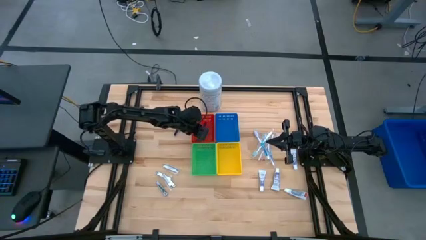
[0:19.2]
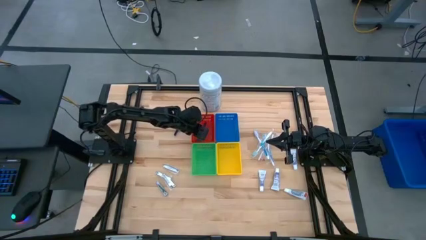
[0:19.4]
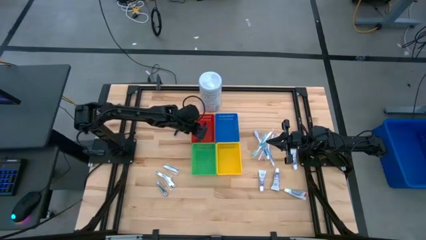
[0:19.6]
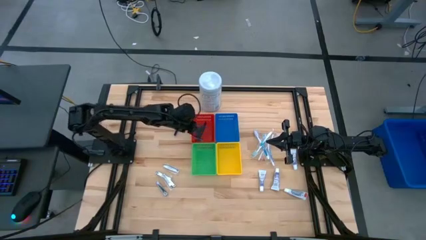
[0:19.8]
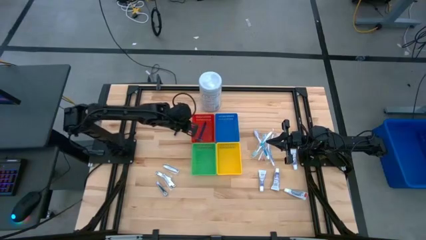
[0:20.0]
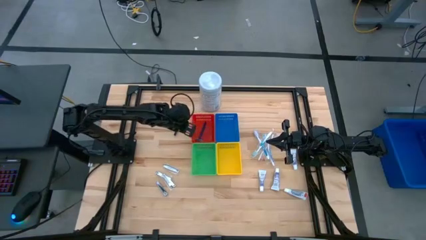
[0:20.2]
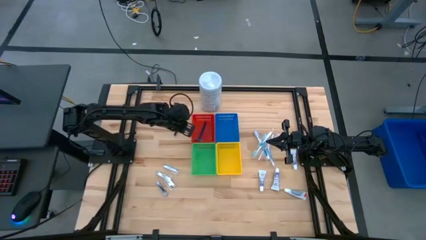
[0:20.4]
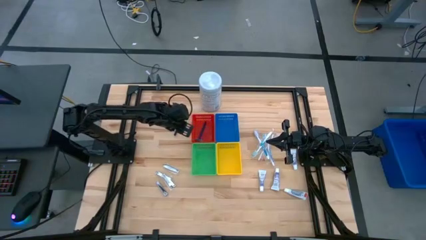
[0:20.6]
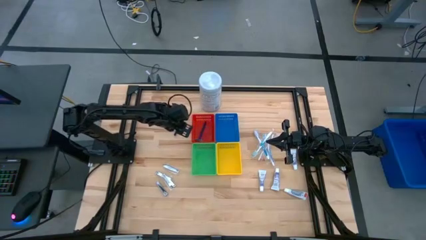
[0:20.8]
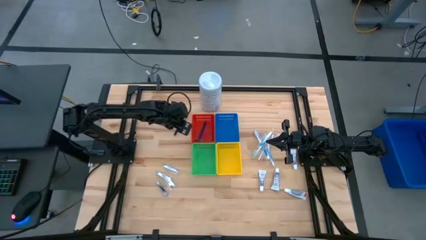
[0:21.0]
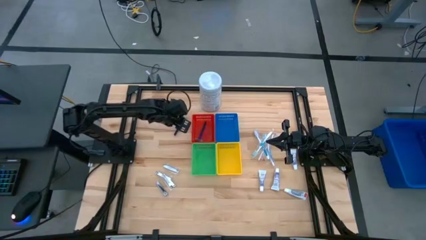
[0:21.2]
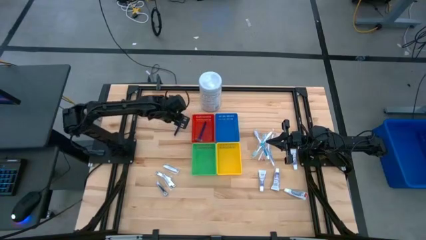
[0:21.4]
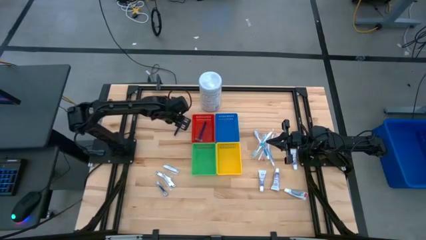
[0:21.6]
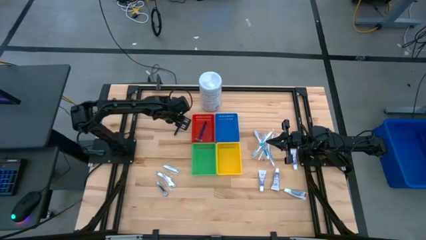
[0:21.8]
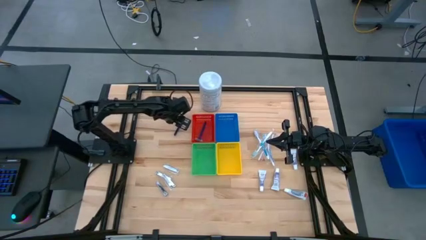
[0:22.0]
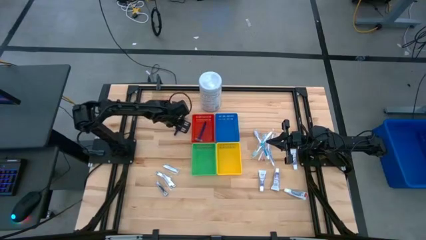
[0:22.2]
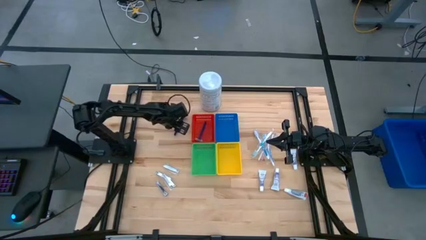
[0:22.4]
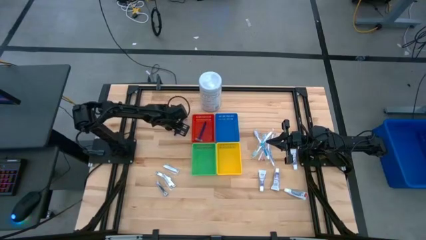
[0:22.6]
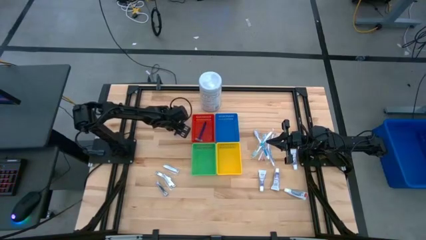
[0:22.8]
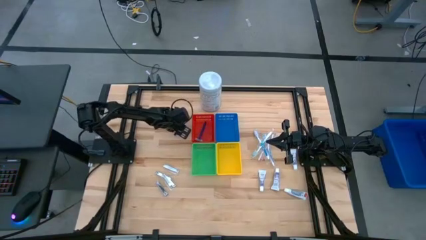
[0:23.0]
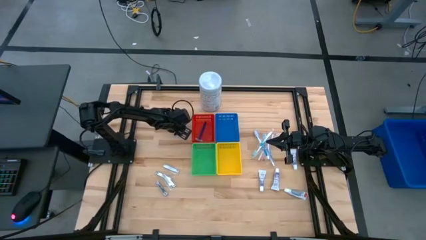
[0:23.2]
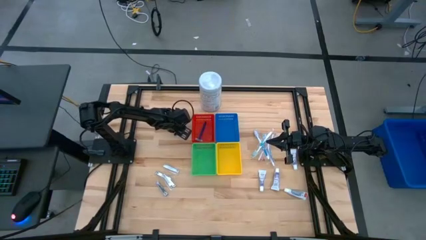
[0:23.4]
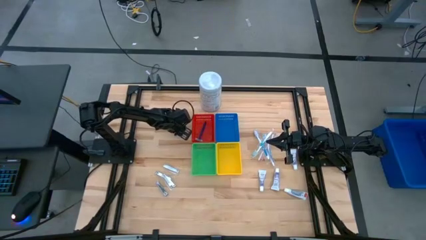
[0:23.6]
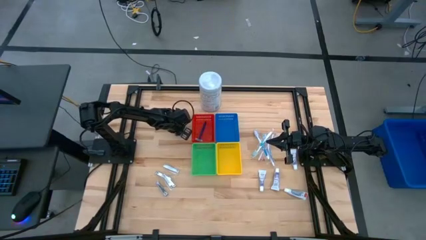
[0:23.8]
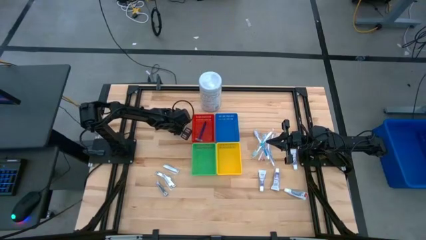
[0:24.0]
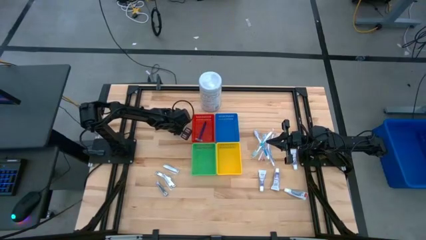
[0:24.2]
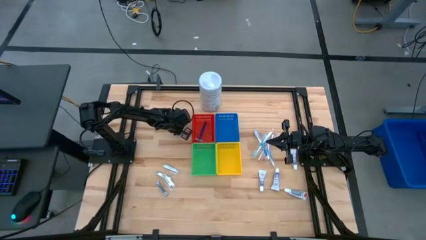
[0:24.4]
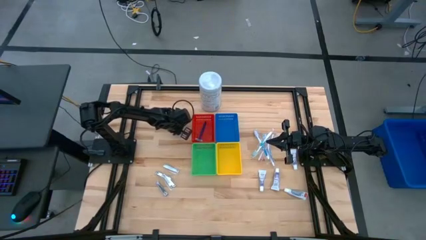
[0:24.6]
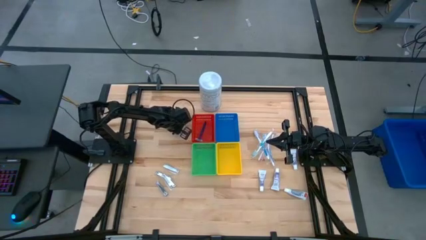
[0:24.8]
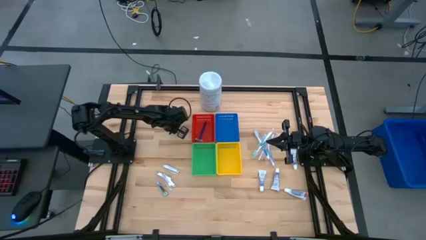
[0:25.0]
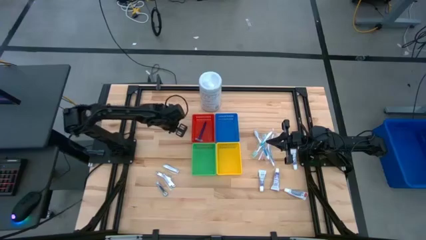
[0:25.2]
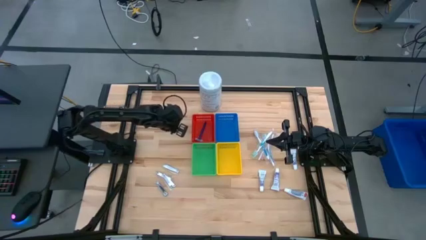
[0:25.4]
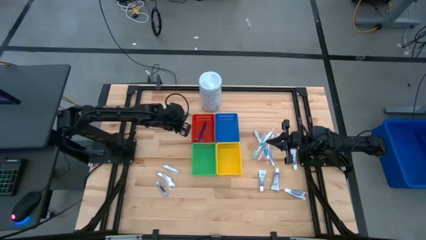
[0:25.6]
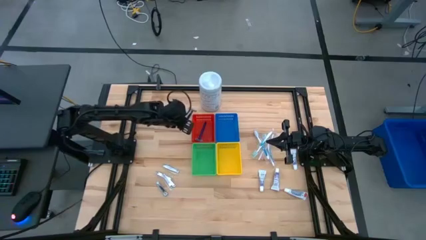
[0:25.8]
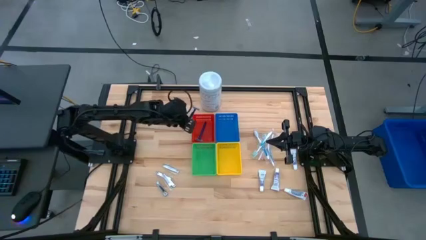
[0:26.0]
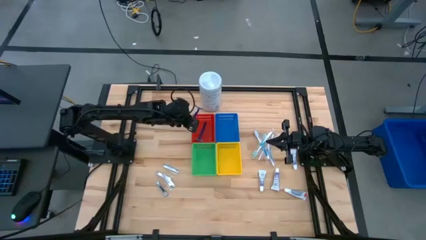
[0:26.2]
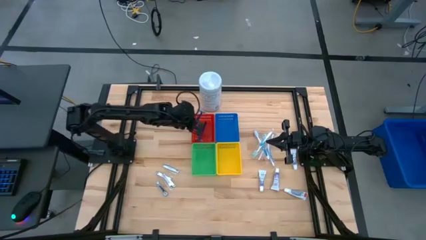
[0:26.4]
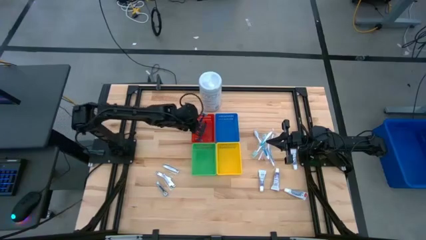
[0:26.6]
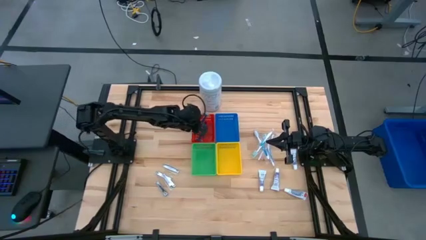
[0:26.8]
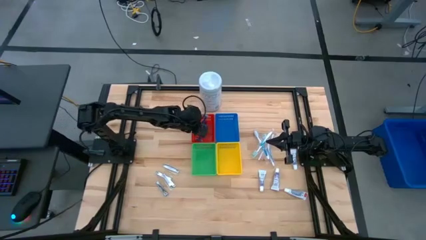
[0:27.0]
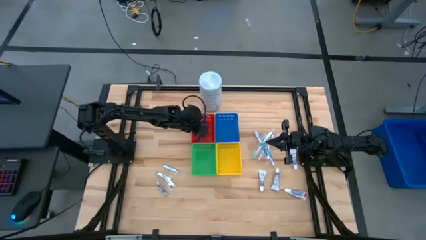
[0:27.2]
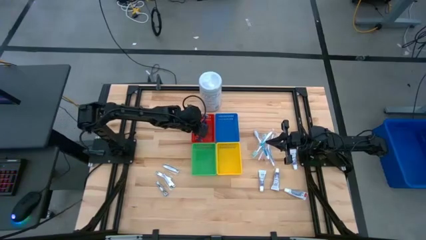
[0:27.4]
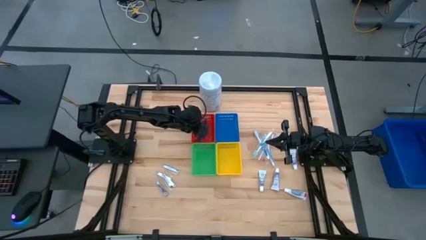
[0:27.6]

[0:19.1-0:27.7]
Task: Pick & Place Travel size toiletries
Put the blue razor into the red bin

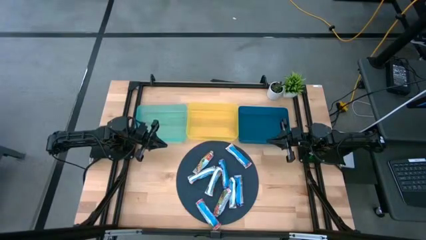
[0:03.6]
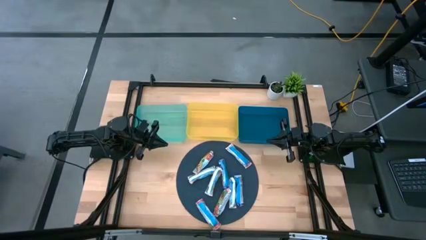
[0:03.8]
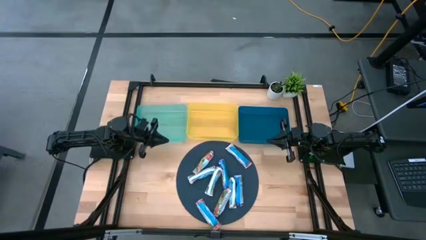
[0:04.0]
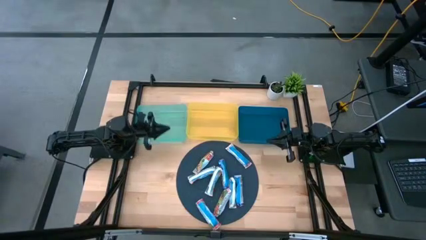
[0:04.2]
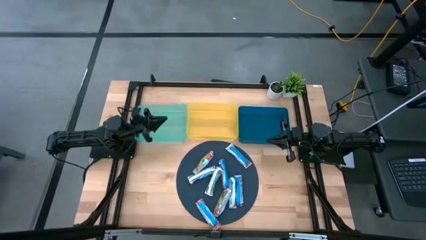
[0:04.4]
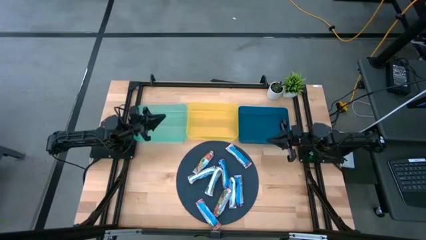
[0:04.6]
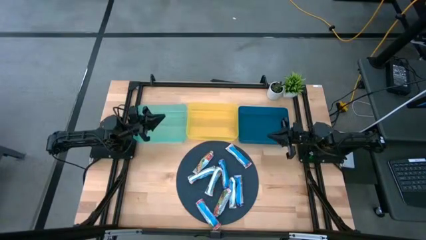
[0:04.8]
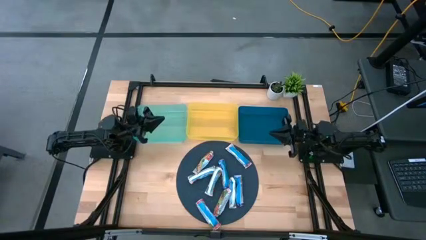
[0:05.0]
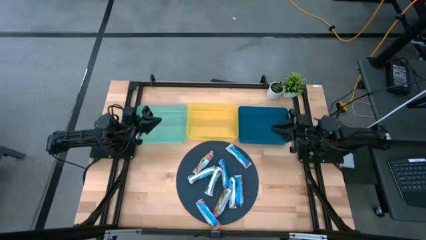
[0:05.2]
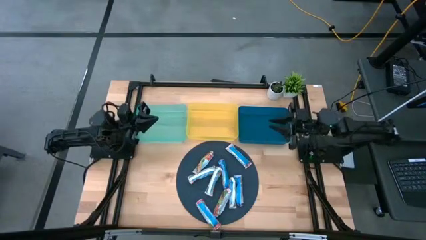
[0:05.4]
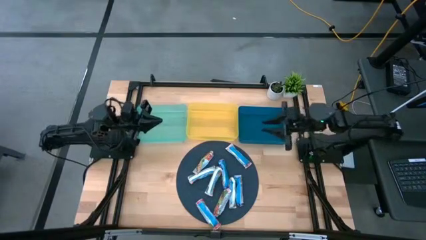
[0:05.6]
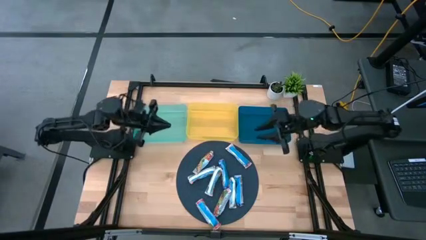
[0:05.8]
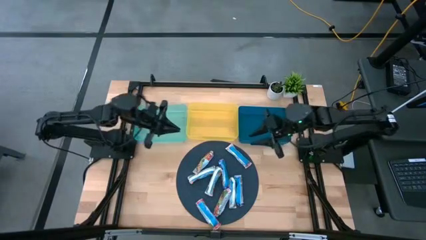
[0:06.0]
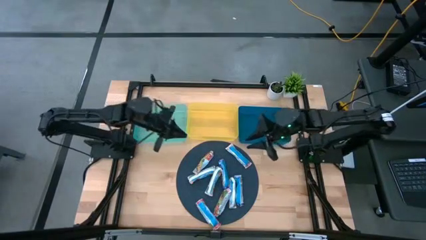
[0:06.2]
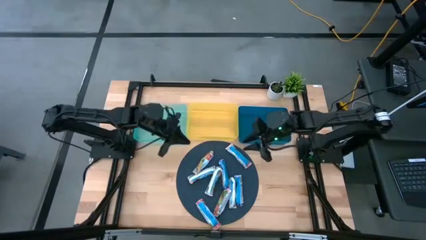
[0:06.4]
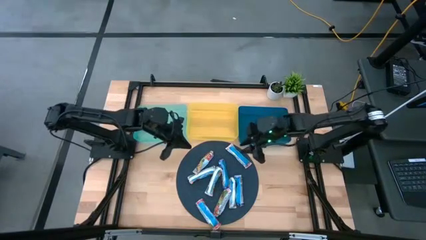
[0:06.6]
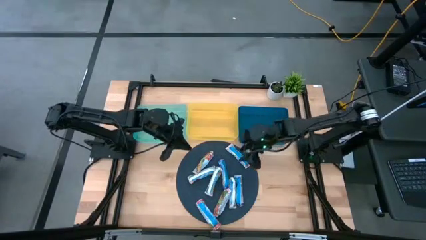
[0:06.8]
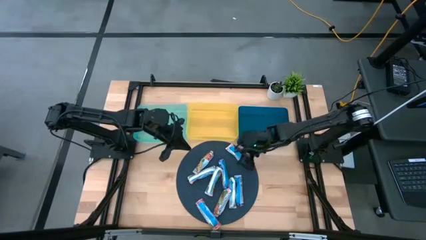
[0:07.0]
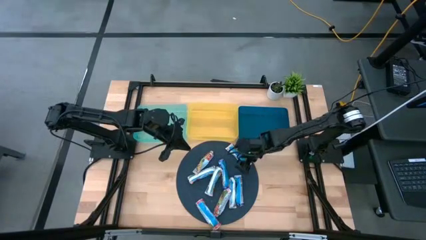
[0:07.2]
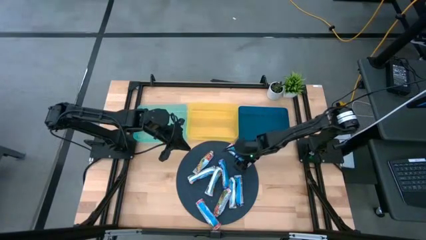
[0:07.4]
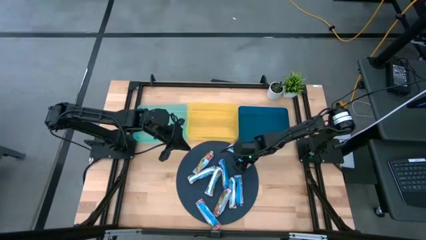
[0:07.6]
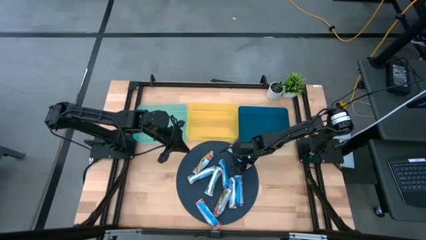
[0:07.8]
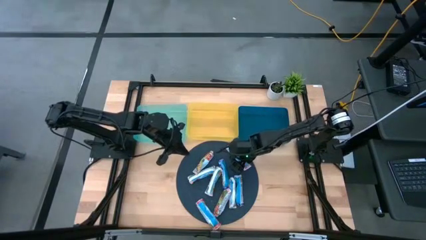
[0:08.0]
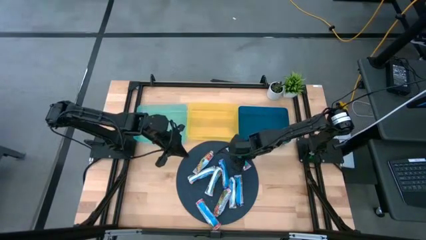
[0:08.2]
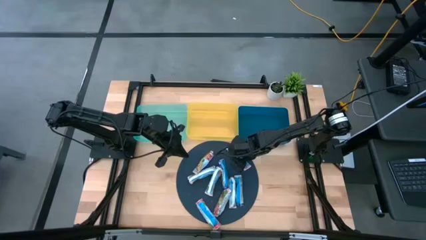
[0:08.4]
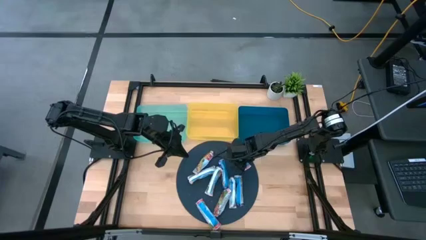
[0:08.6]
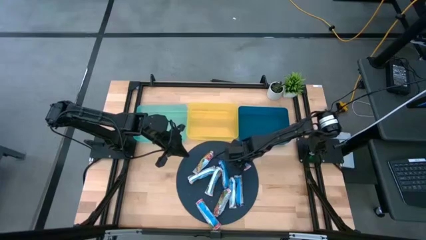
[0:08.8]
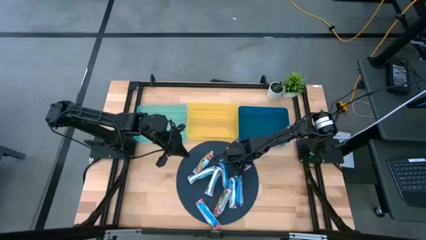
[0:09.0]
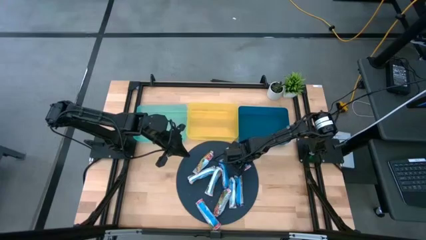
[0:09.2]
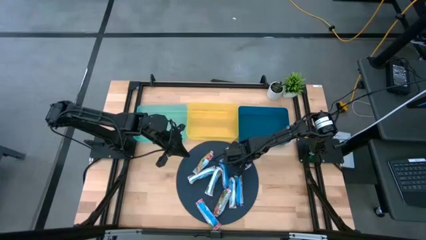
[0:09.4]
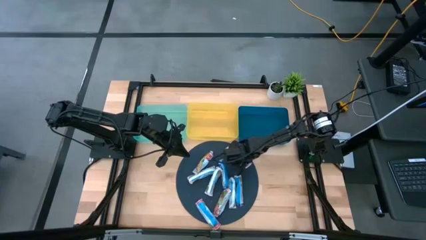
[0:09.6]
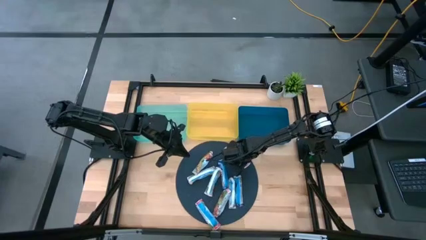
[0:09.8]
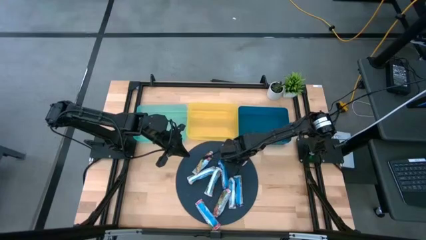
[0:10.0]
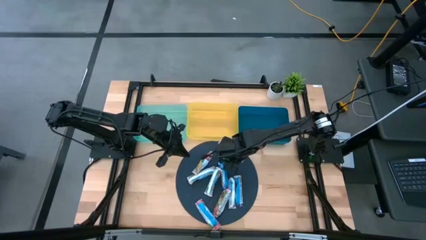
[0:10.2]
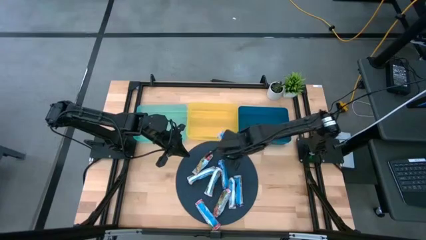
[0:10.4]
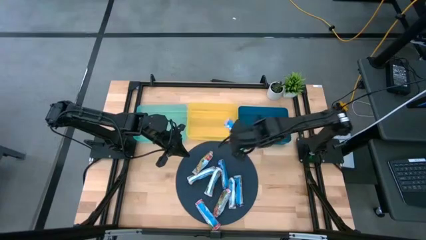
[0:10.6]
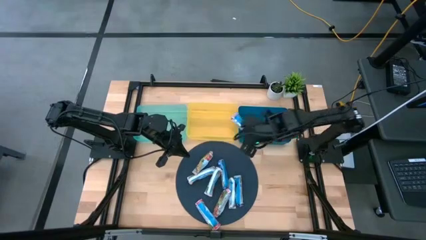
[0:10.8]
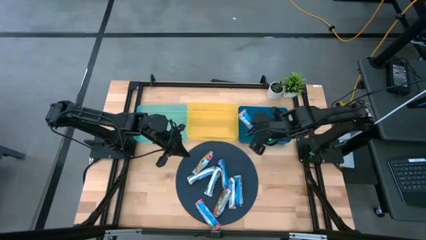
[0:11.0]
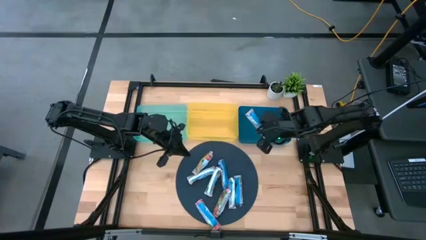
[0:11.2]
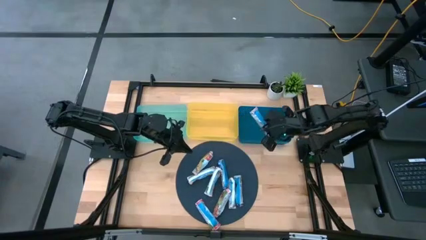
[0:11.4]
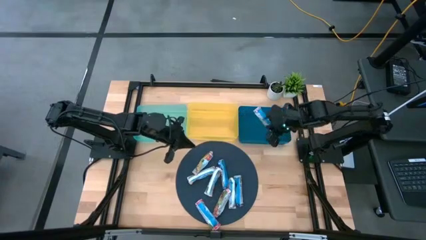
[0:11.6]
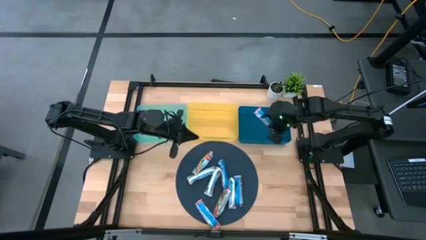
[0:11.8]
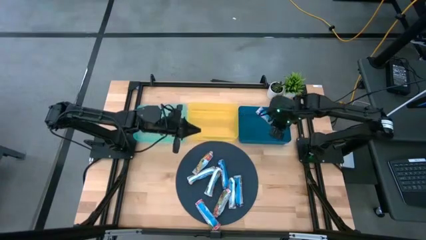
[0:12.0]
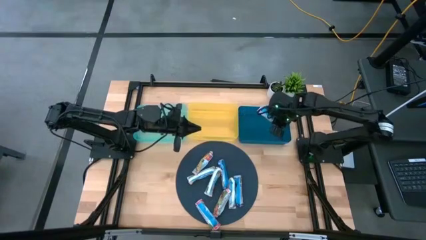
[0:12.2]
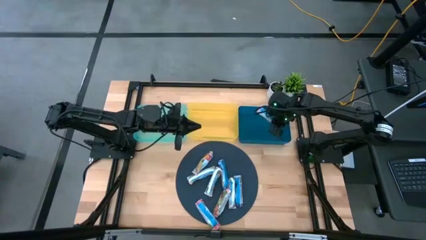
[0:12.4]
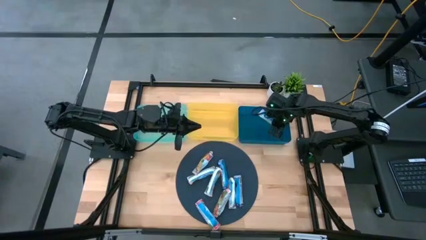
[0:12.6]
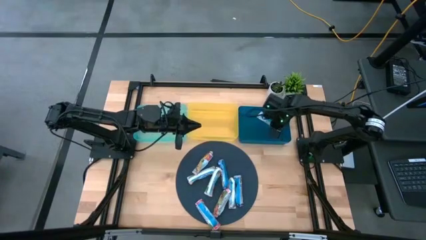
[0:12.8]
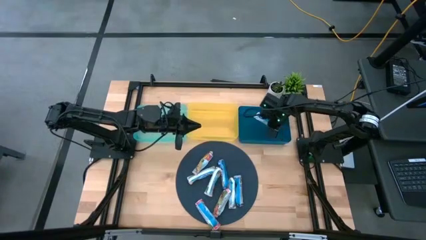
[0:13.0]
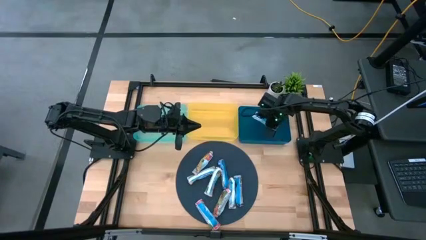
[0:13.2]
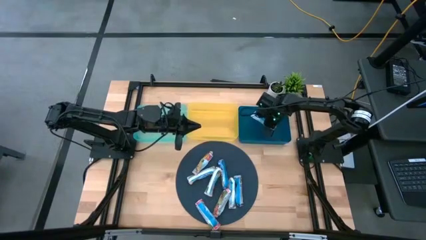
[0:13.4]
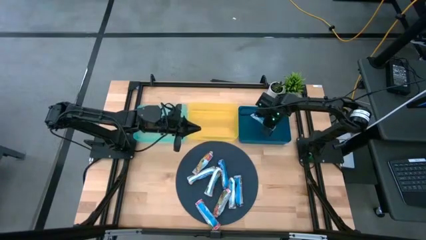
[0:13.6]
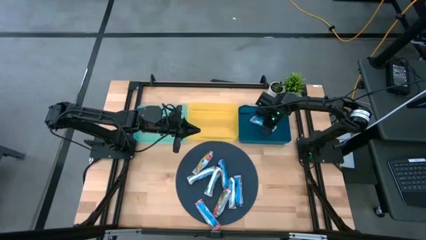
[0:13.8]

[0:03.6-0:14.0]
Task: Pick and place Granola Bars by type
Put the red granola bar into the blue bin
